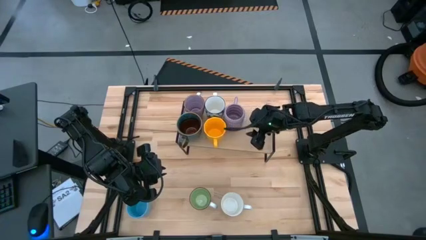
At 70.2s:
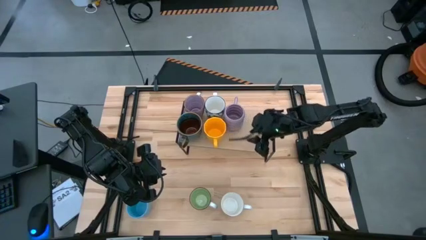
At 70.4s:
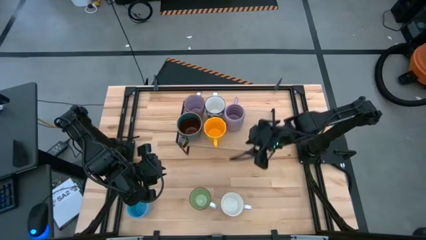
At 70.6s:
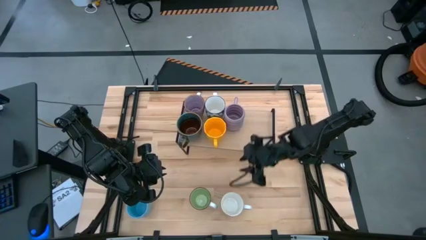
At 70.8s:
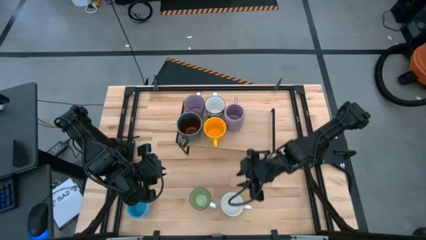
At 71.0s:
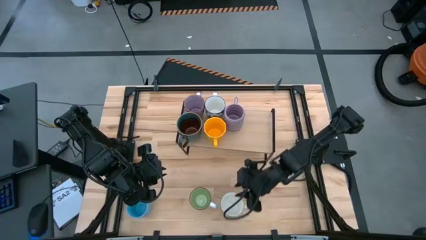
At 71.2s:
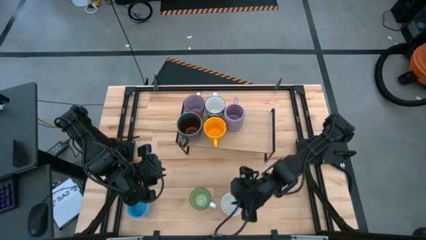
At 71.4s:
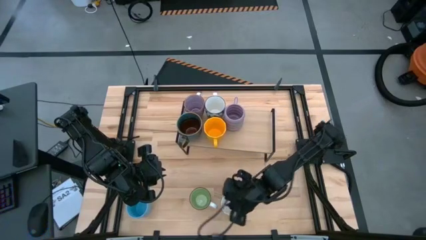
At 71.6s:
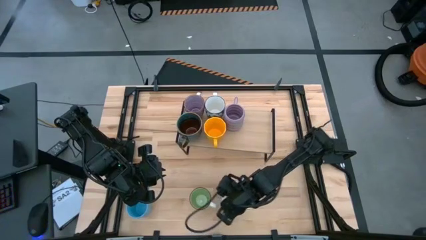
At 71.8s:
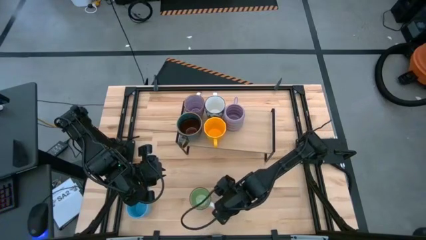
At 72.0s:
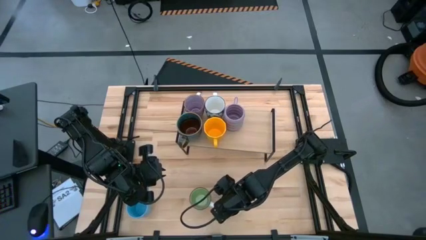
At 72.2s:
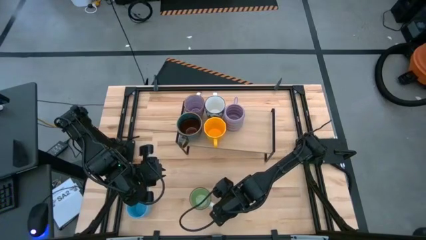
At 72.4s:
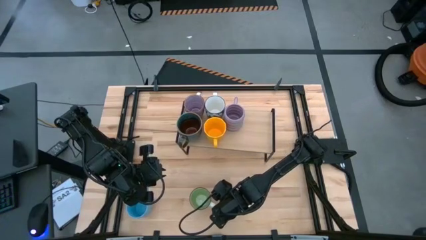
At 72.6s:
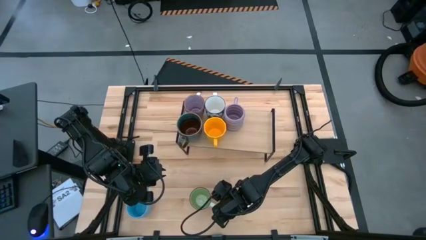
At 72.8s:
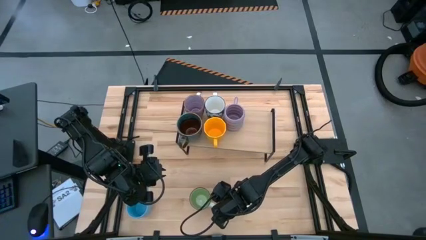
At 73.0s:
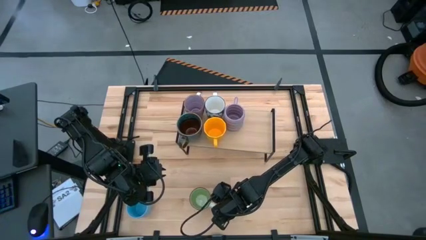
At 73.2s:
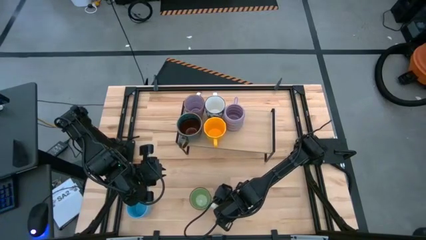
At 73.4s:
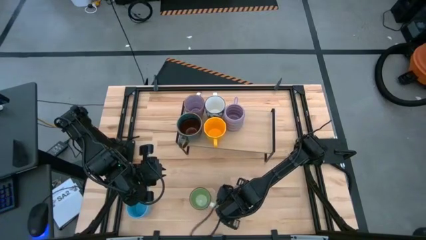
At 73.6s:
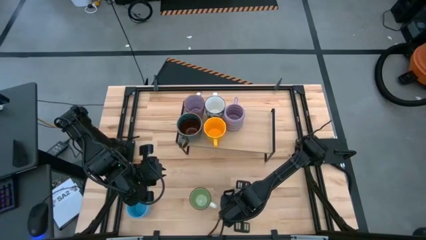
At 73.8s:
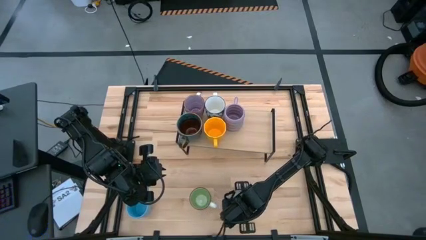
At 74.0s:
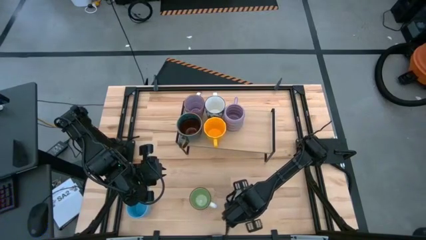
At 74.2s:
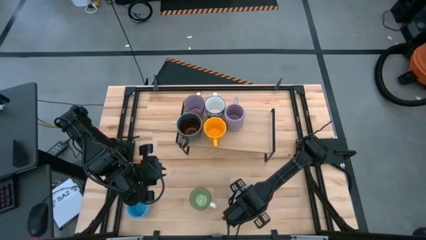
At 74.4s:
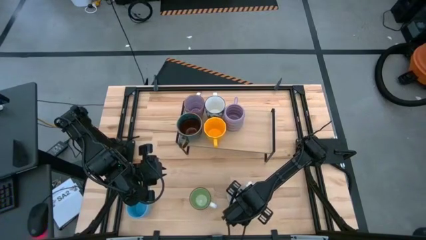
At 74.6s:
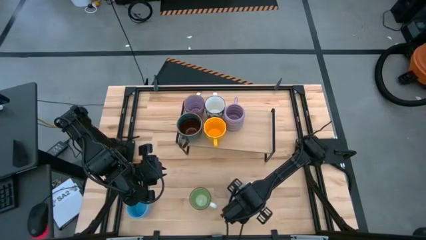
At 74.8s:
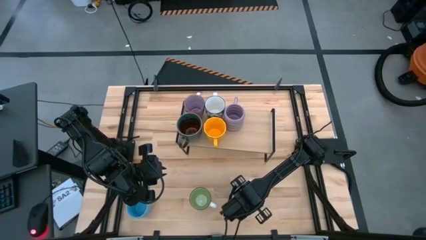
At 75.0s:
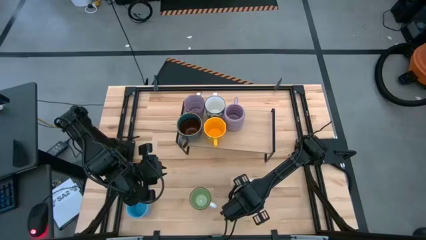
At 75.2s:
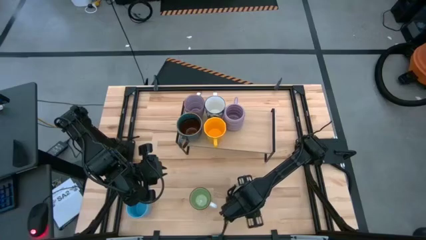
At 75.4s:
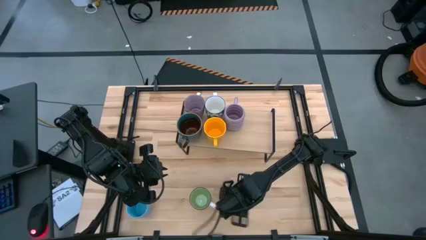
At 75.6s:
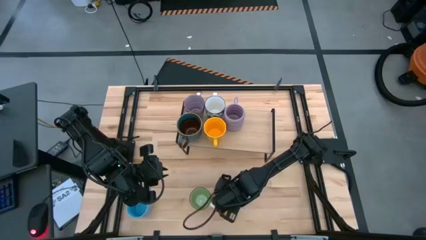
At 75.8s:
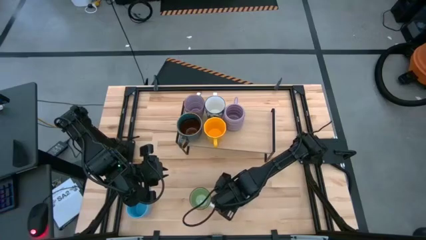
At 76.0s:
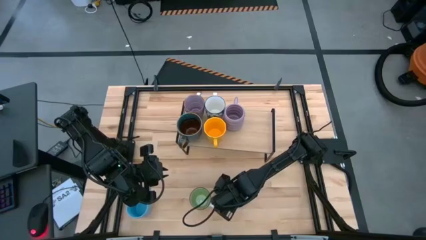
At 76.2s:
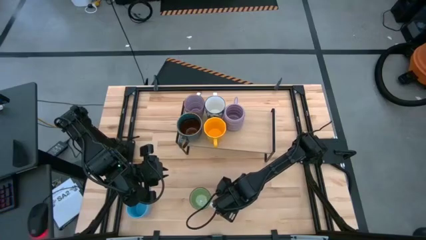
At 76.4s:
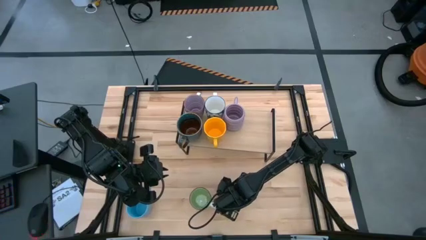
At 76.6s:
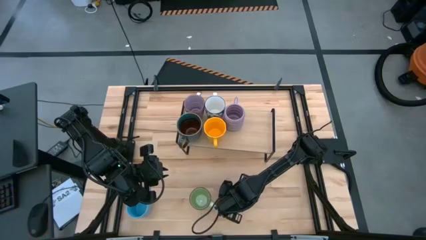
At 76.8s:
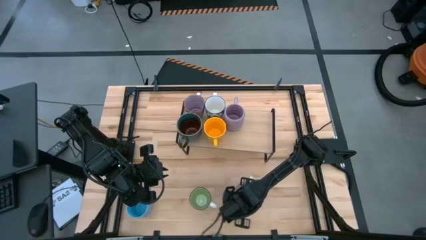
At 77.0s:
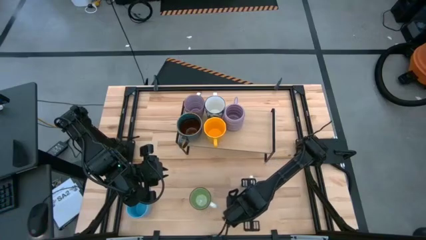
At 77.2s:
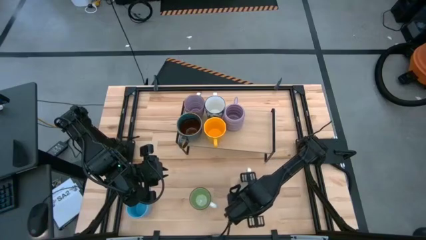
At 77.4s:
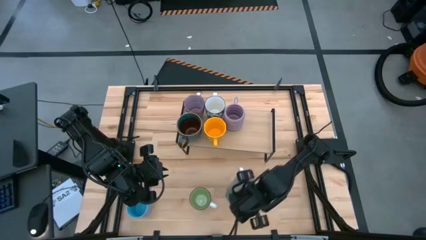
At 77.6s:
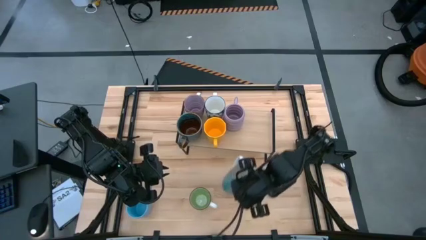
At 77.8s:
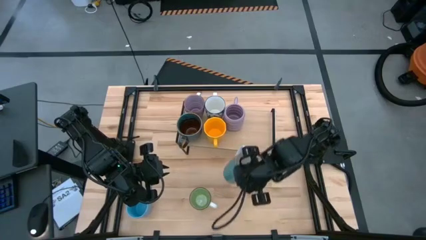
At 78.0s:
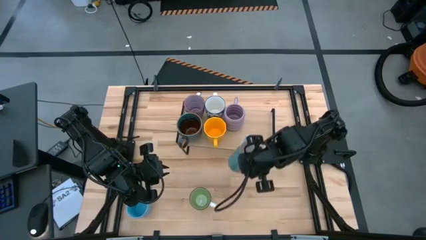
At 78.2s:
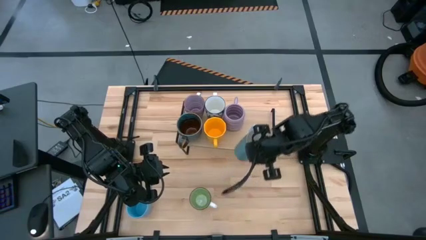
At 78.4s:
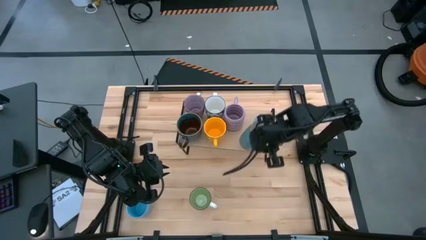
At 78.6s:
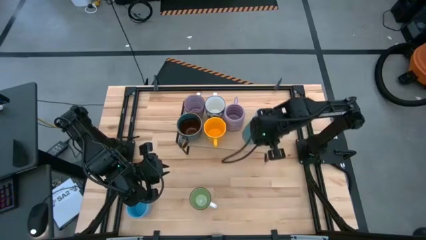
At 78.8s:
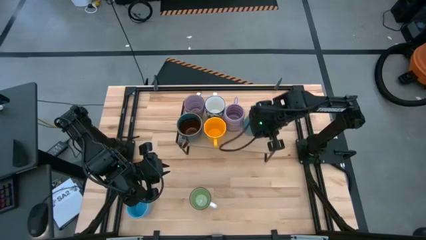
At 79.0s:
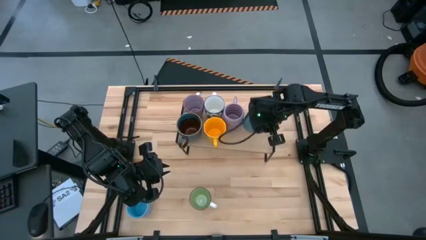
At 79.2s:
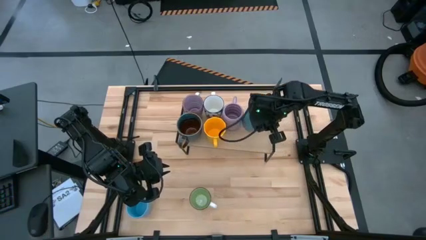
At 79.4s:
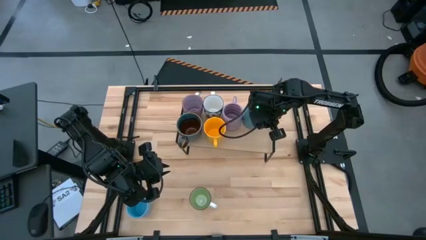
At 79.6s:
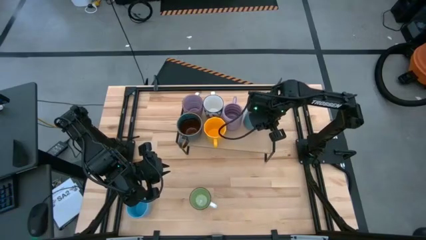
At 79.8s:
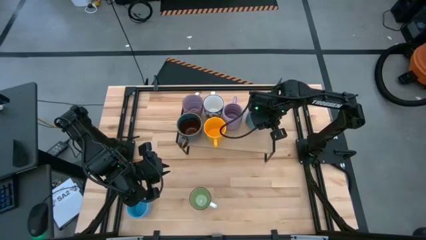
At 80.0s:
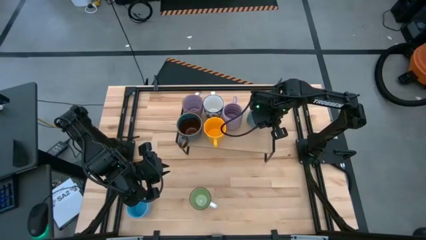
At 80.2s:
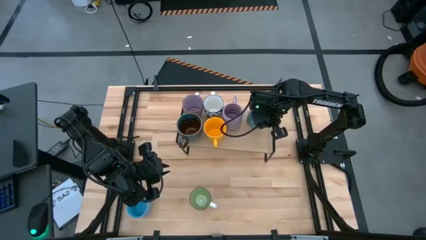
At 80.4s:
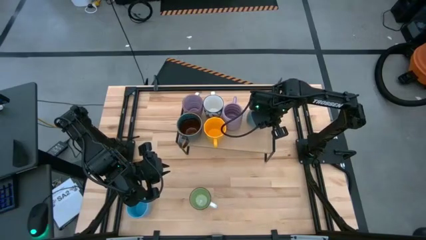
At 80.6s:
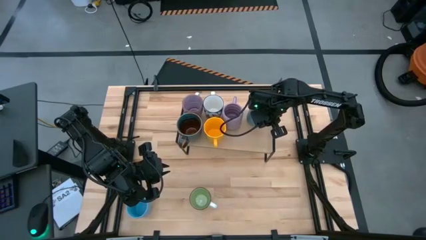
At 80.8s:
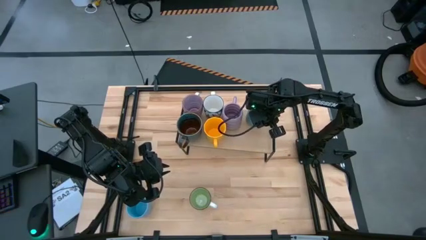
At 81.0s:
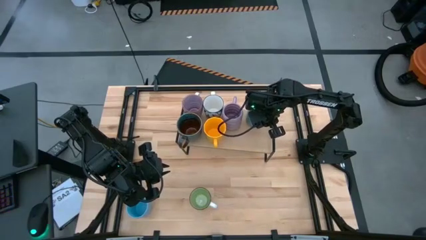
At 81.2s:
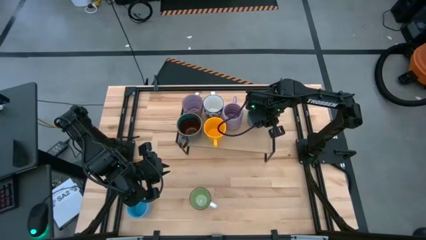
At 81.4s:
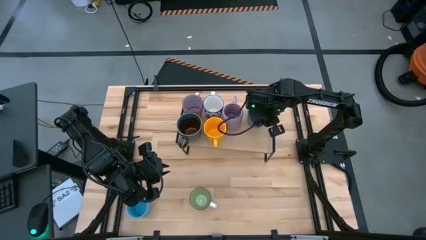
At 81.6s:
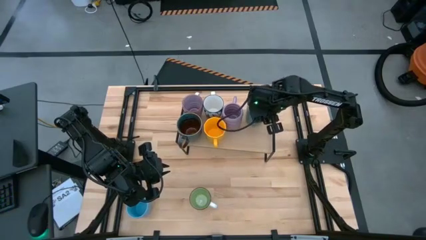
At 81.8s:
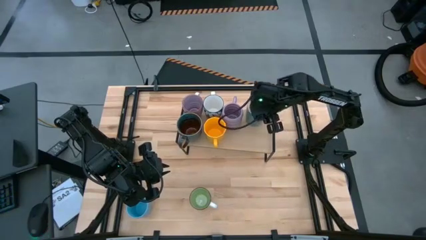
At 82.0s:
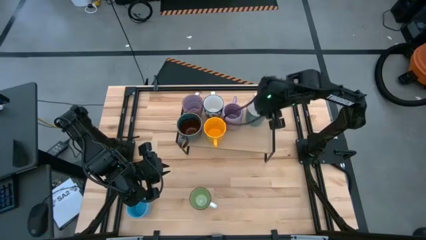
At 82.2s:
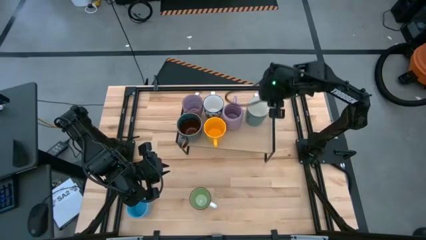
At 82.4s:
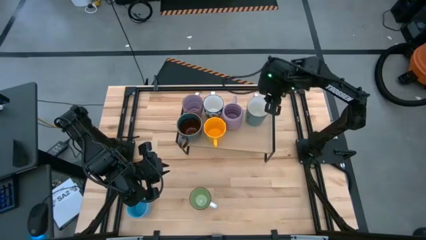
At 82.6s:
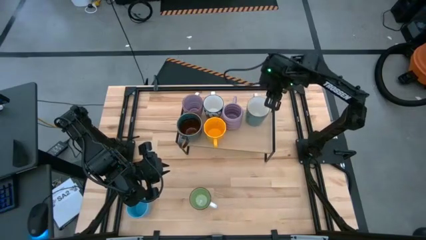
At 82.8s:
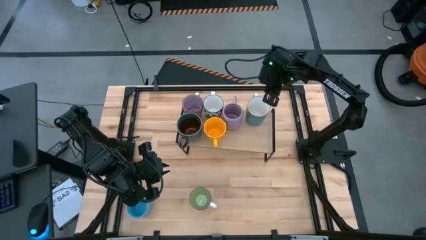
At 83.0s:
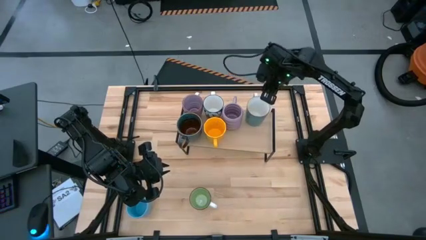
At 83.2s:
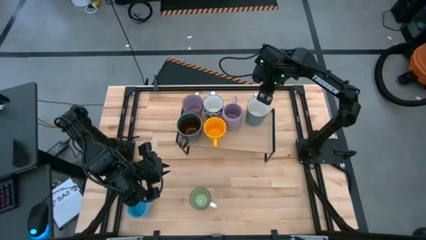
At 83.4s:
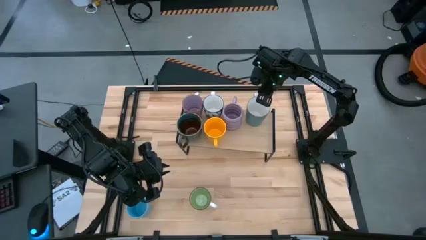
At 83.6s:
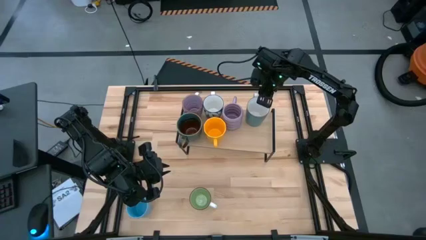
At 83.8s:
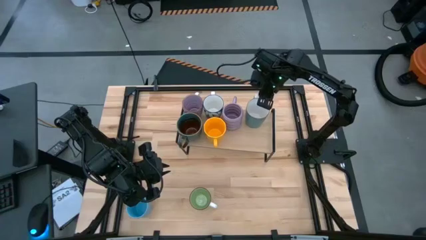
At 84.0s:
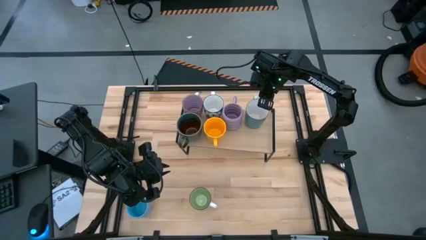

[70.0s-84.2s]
Task: Place coffee mugs
Put the blue mug on the shelf

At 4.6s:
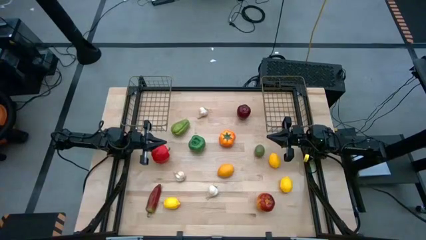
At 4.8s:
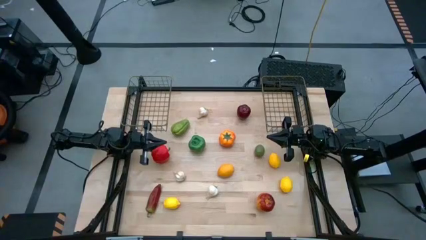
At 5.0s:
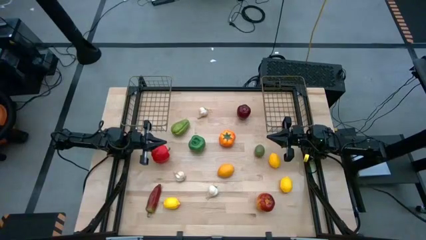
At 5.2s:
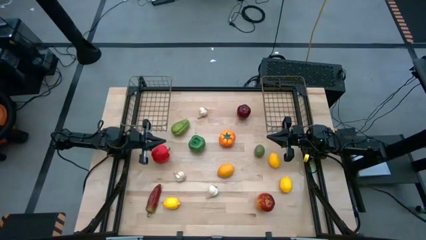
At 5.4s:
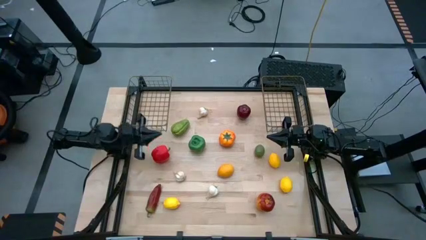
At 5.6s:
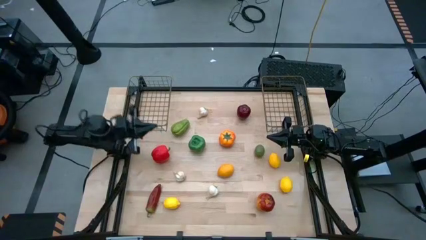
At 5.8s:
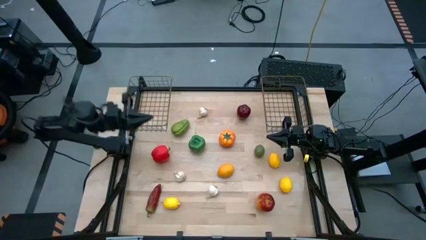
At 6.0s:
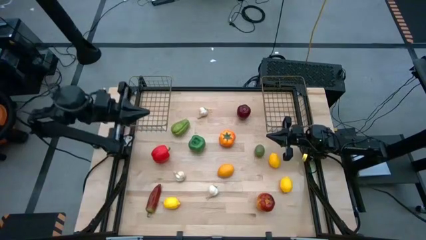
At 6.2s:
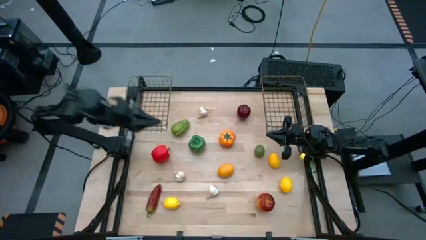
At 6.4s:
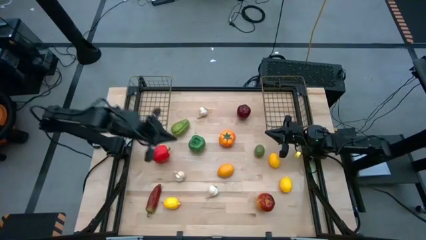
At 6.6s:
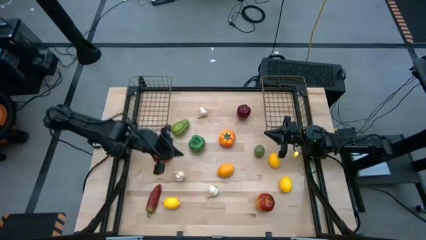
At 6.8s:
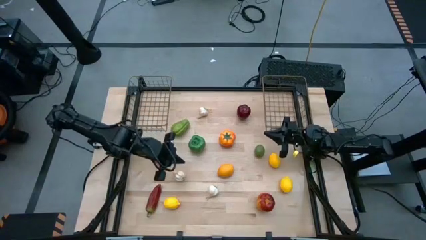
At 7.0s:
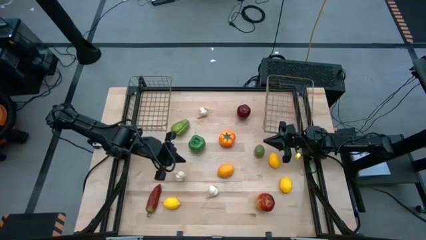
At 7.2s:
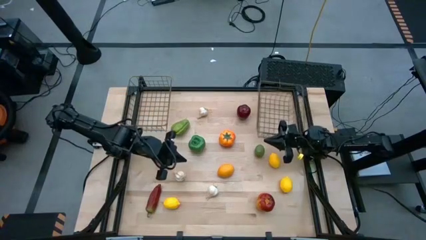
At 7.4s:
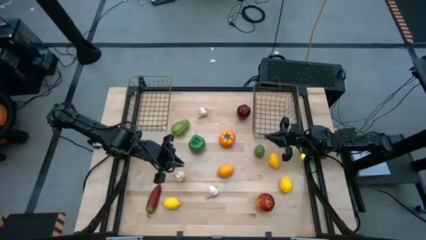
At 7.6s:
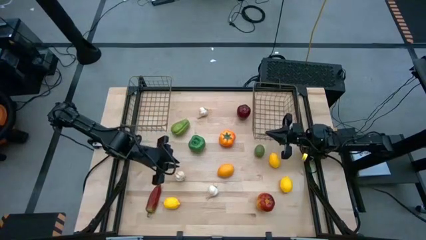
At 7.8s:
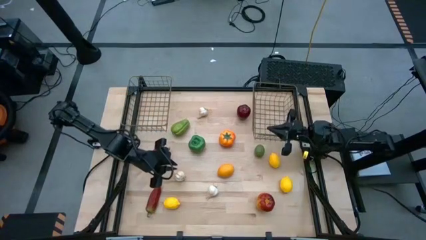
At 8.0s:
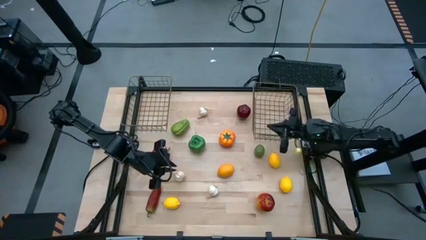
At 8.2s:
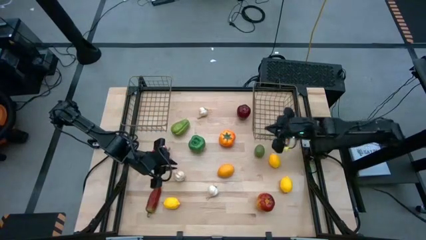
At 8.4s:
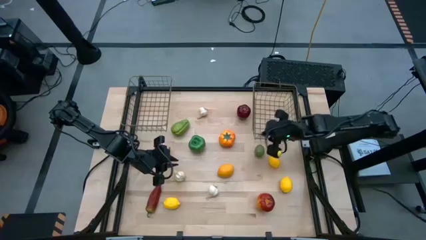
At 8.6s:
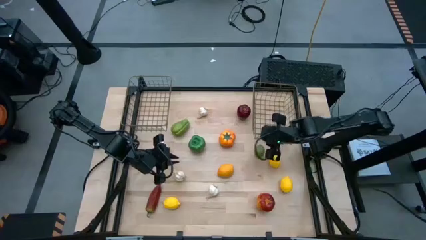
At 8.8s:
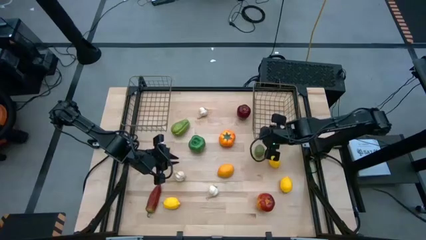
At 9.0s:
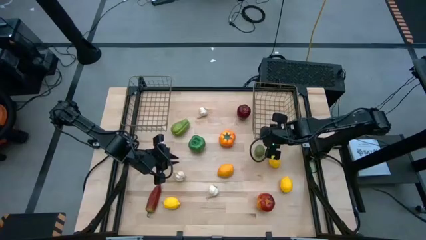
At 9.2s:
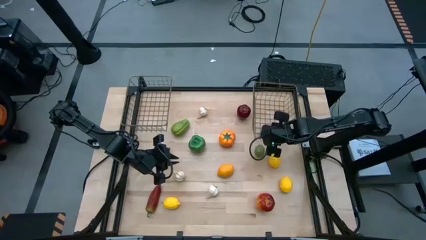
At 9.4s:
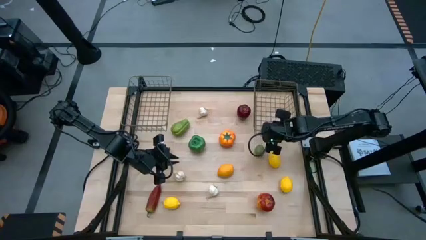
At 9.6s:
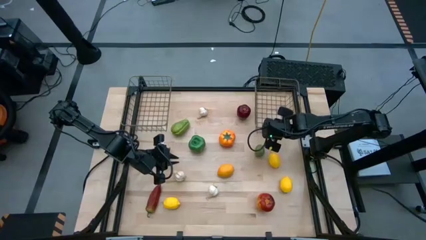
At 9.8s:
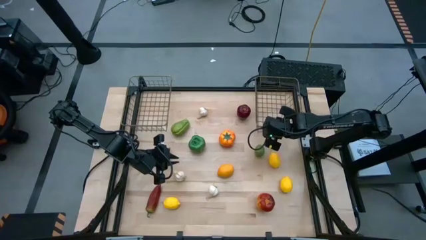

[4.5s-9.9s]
Task: Sort produce into baskets
Adjust the right wire basket
